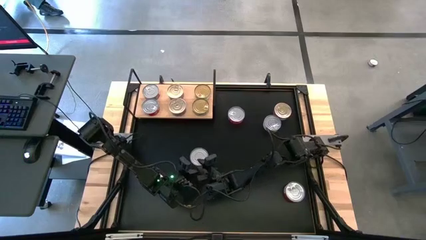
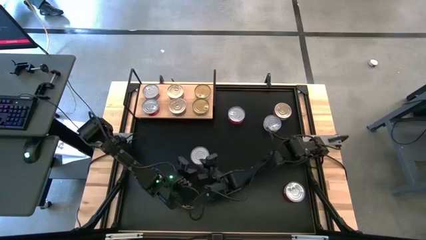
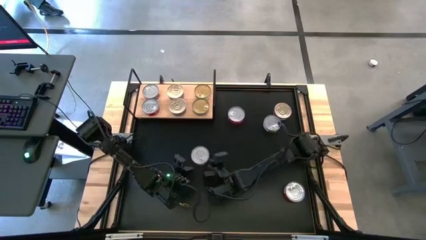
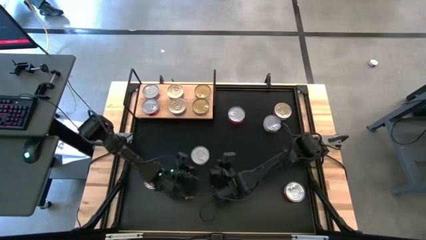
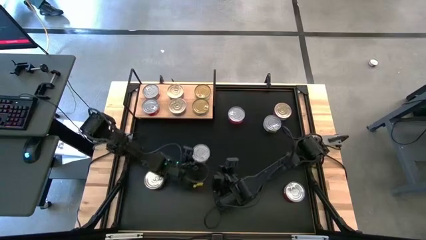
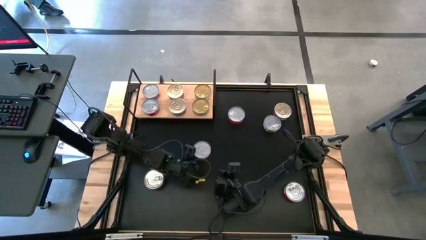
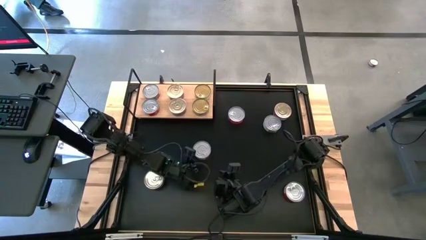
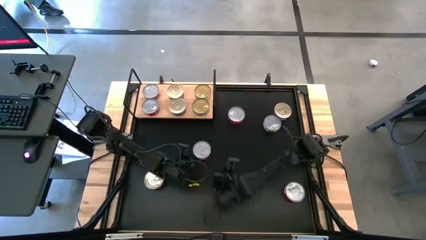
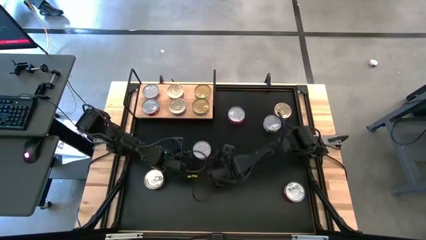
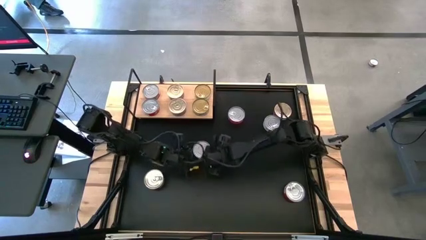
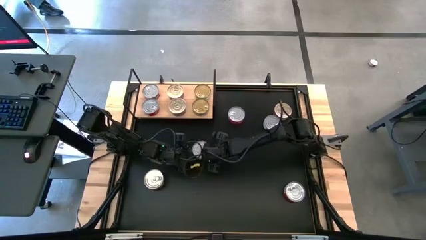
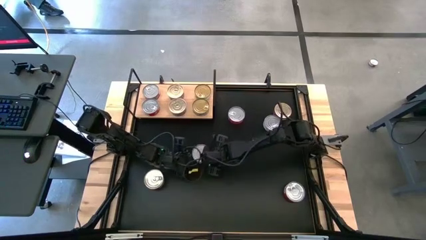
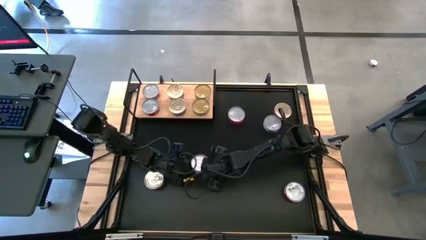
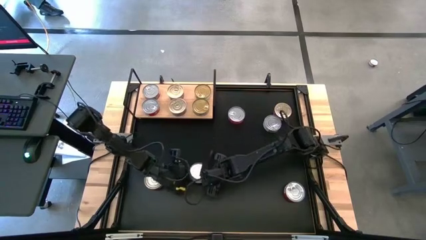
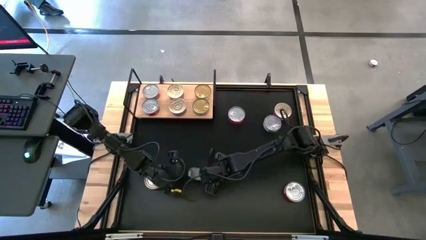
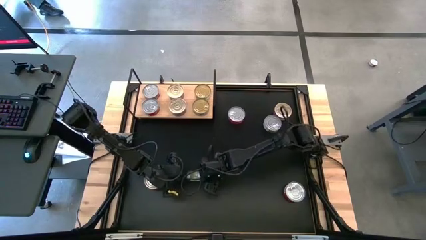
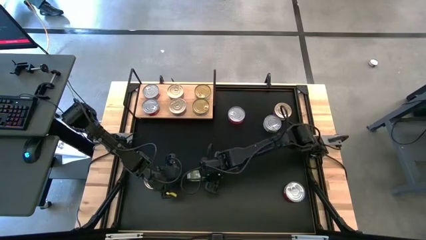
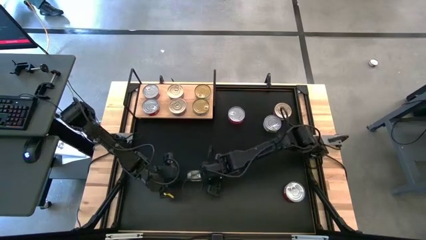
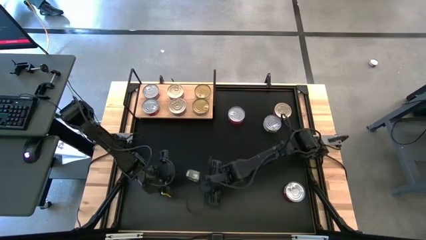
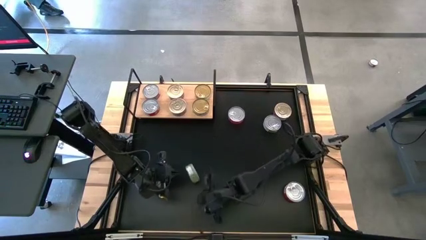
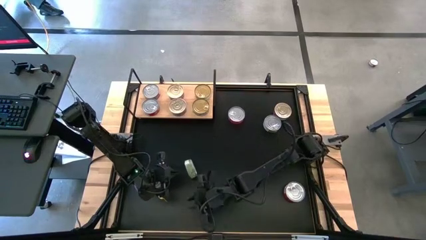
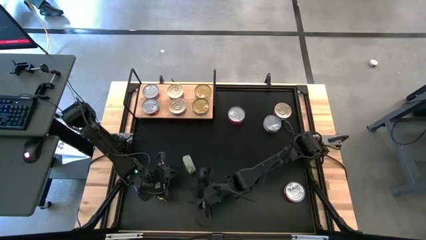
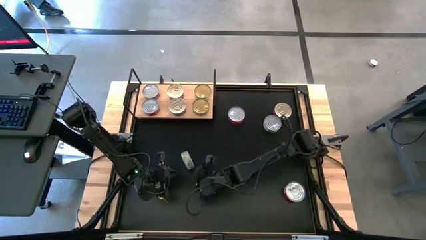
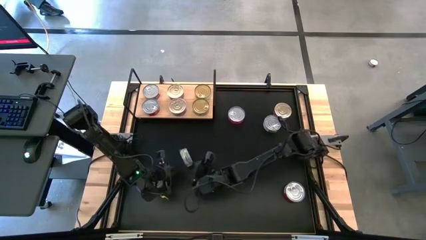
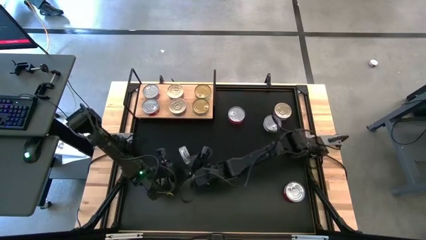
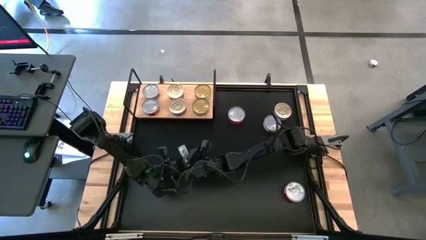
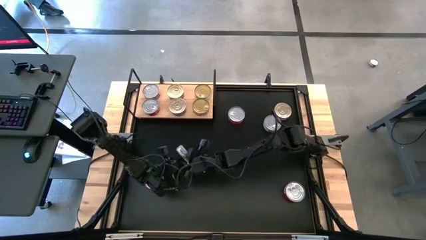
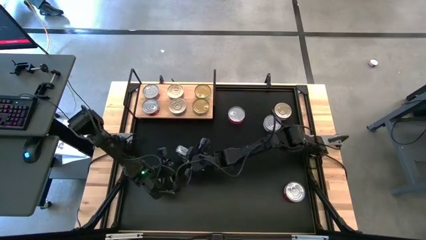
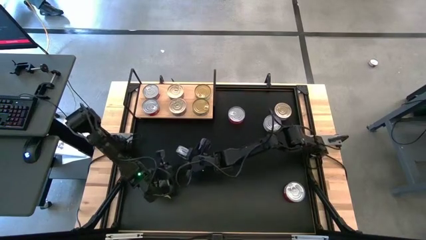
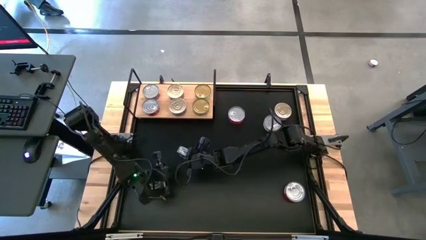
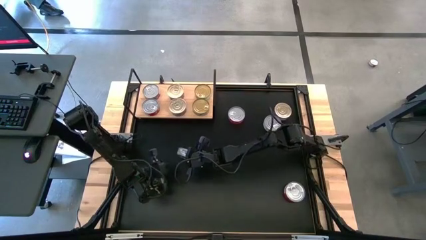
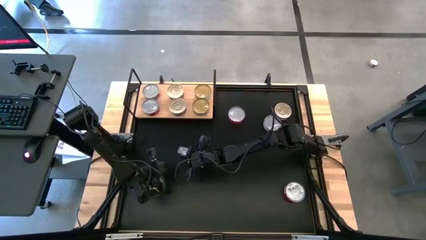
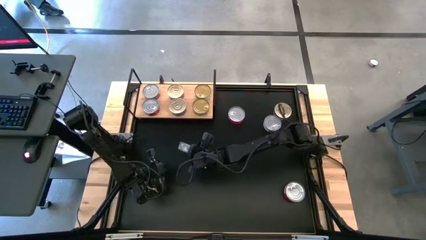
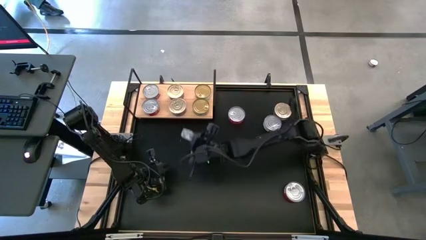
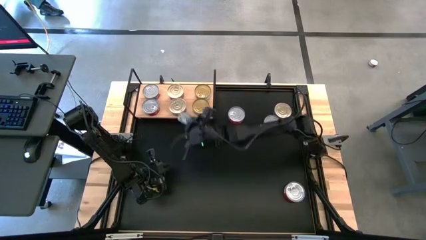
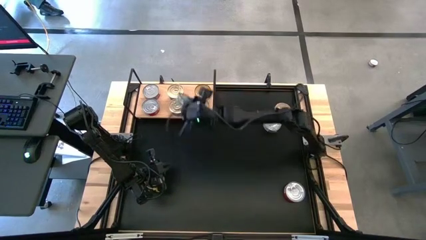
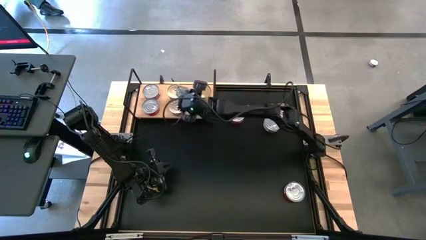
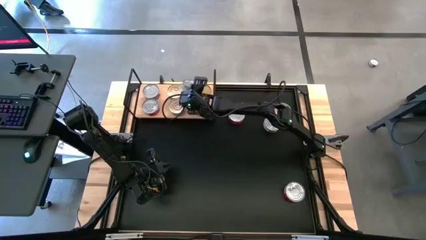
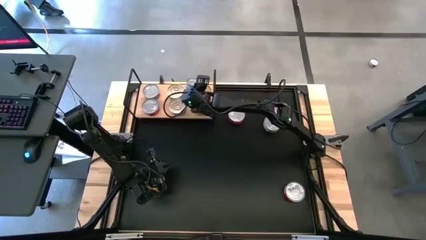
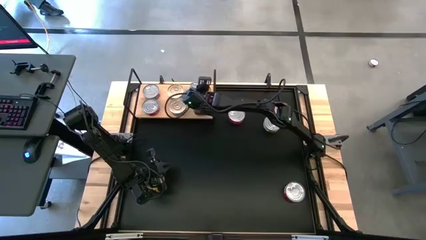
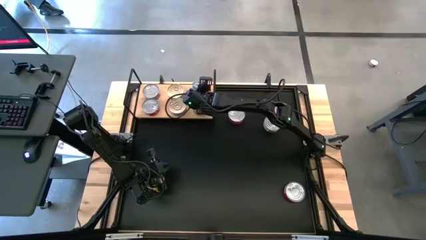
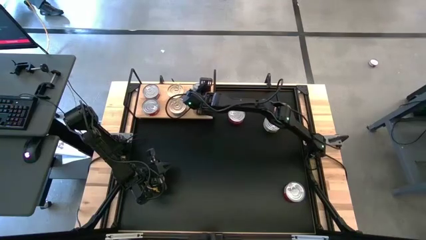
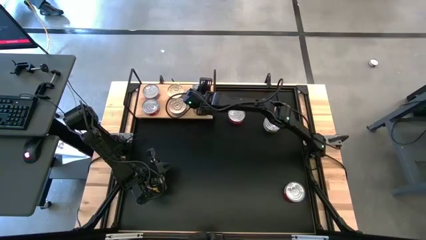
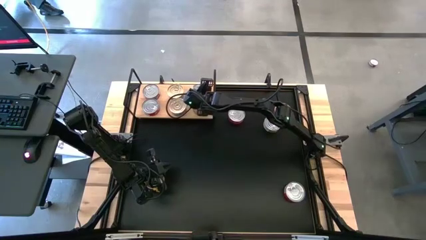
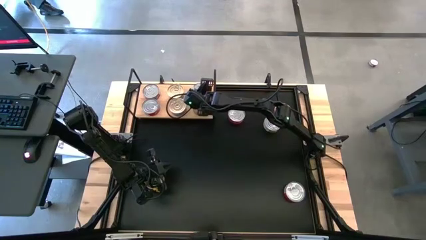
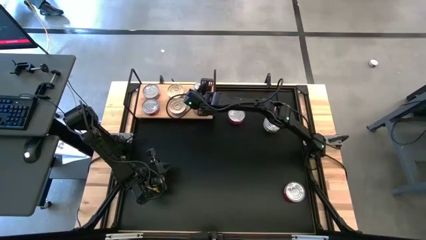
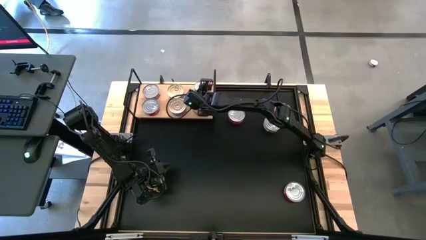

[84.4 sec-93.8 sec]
Task: Stack canned seafood by type on shelf
Stack the green tuna can on the top of the other green tuna can

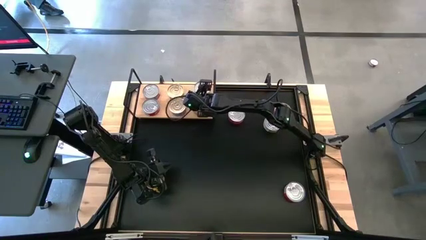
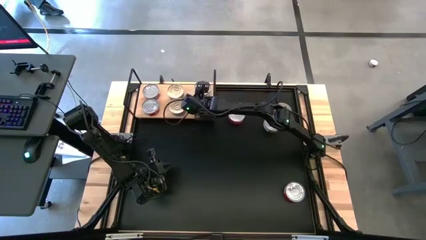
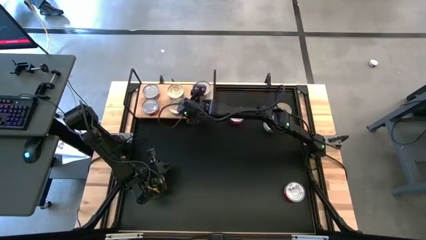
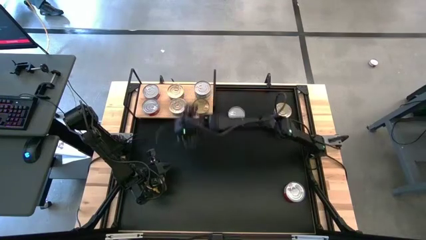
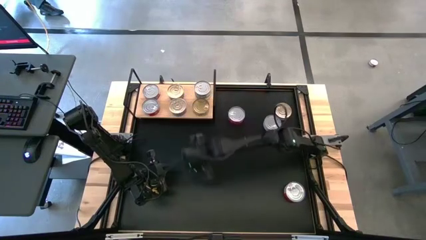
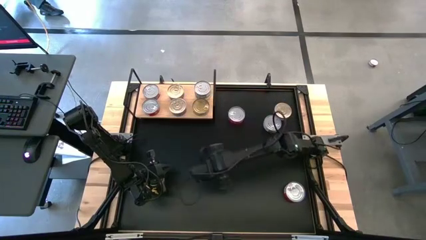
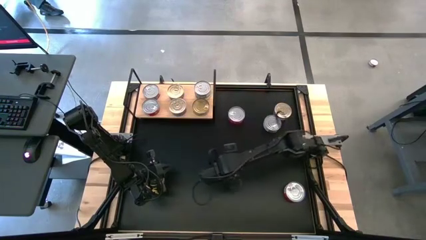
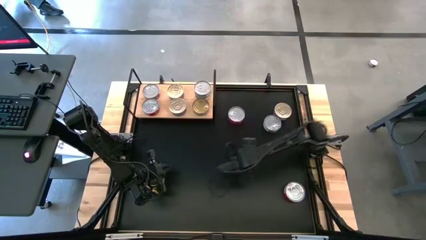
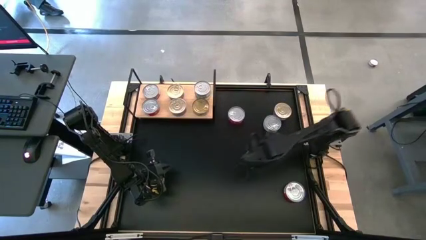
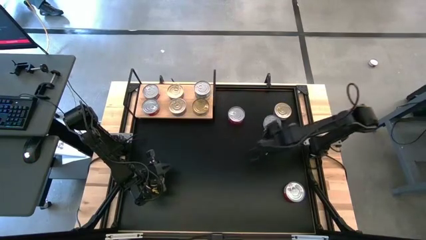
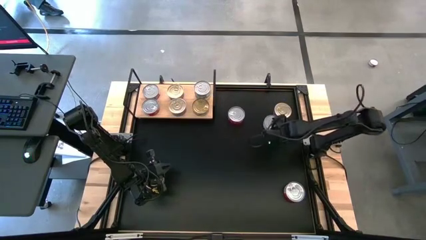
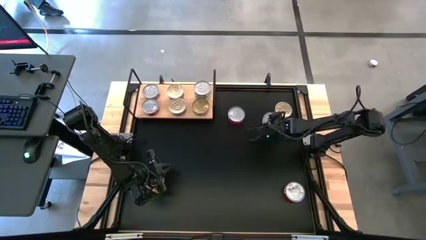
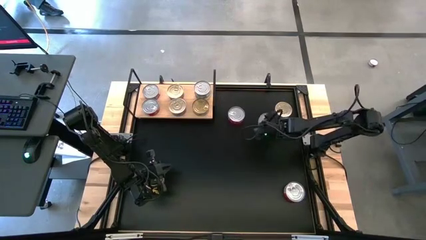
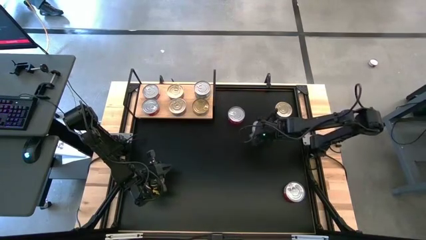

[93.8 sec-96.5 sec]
Adjust the green tuna can

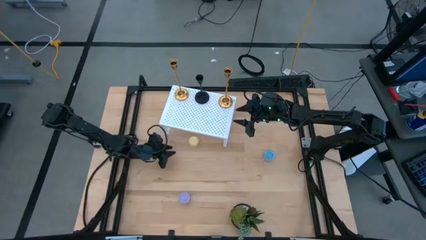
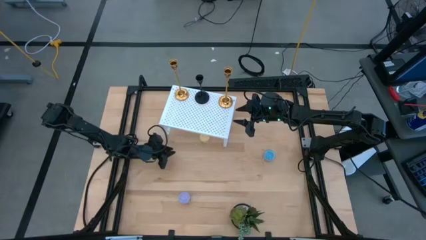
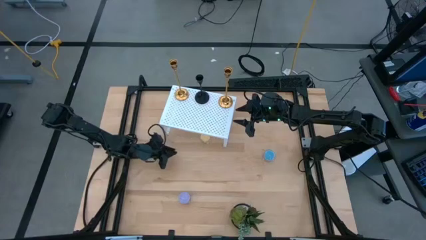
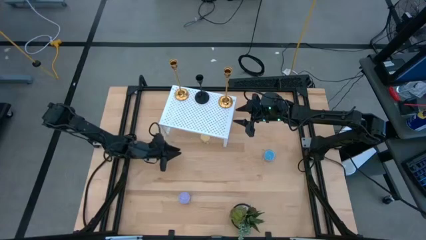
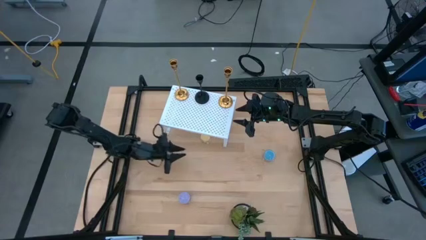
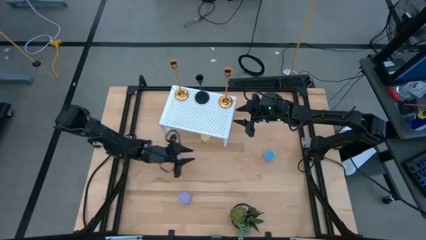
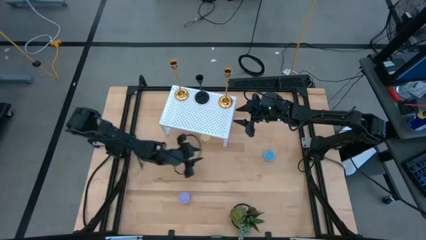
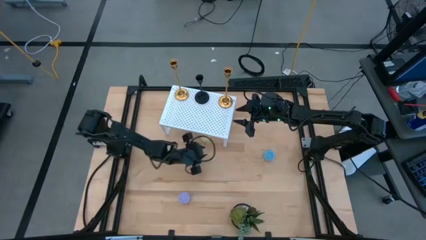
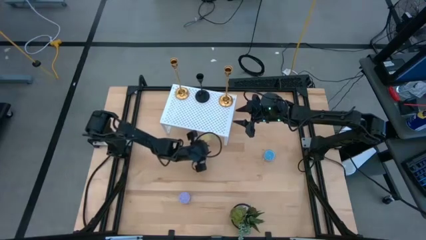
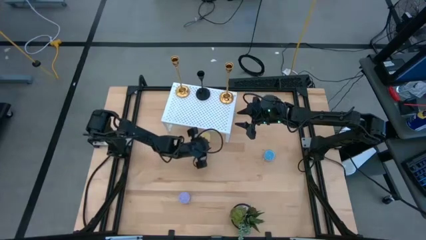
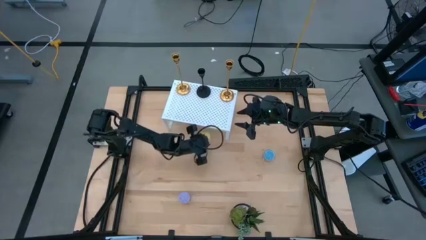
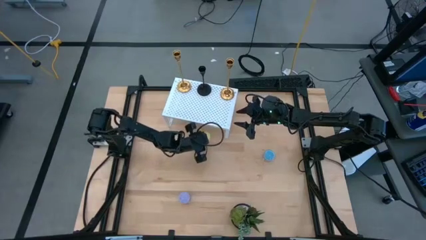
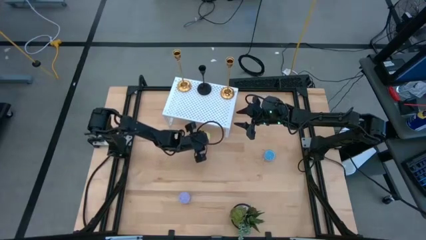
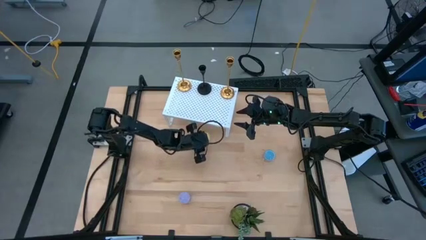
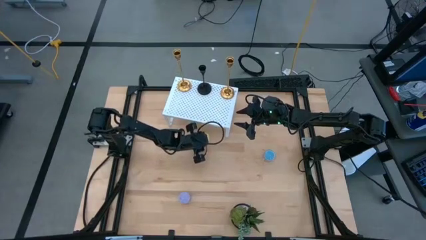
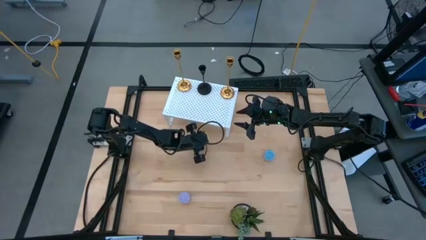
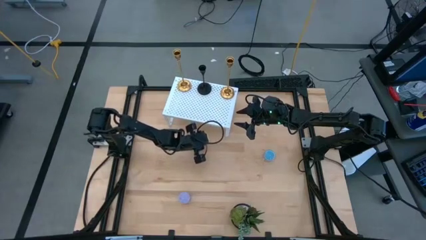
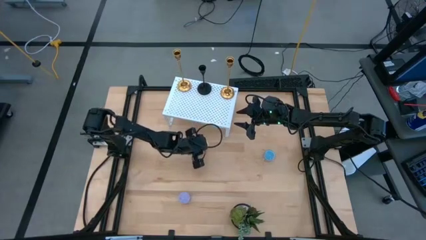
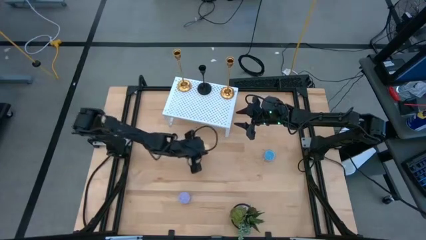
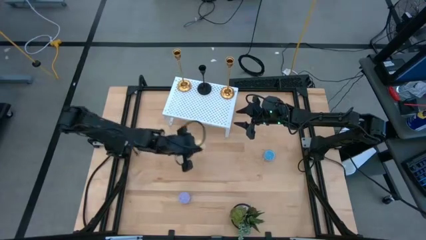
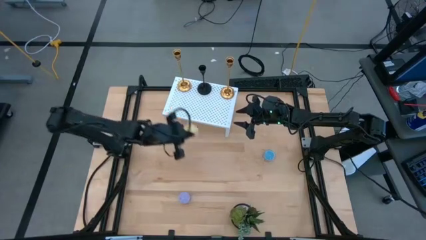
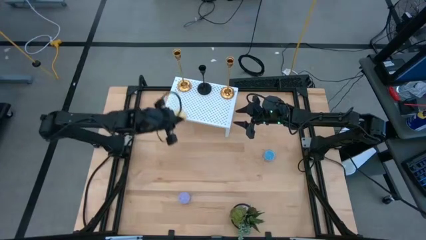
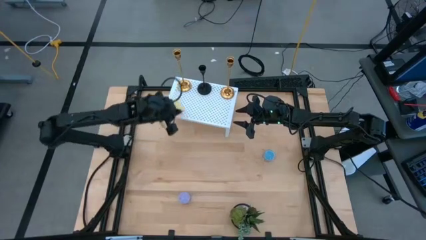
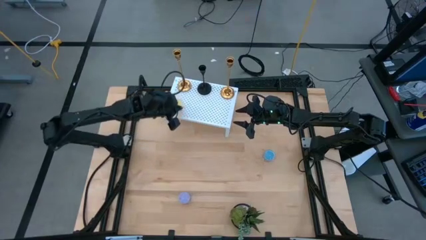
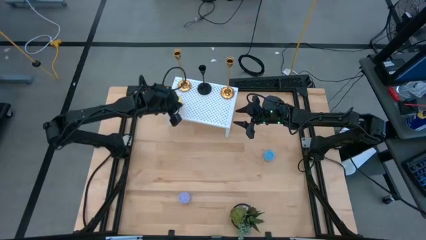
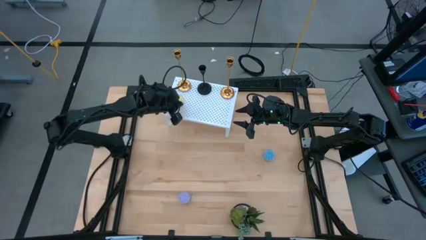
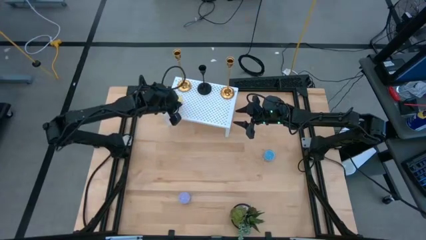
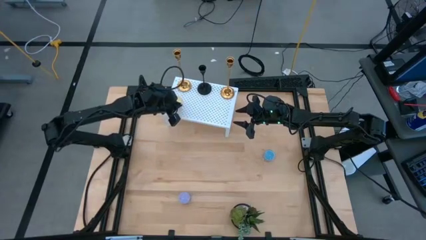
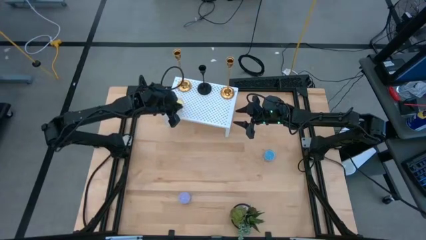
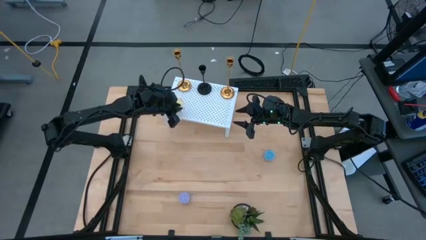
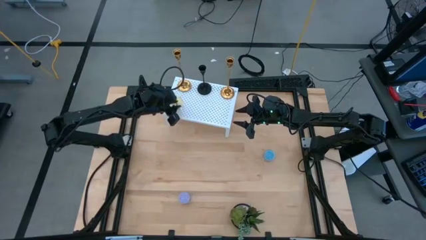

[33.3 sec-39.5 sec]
Task: Pick & Place candle stick holders
Put the yellow scented candle on the shelf
